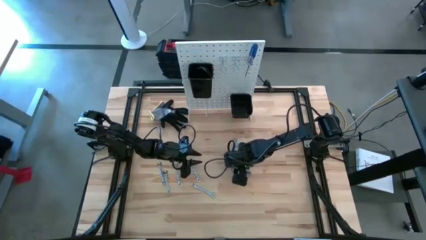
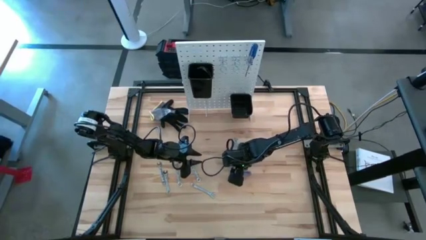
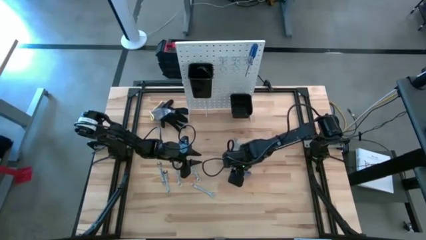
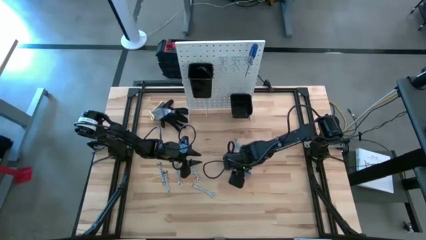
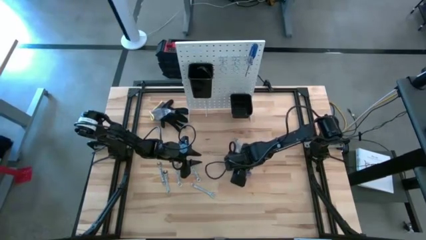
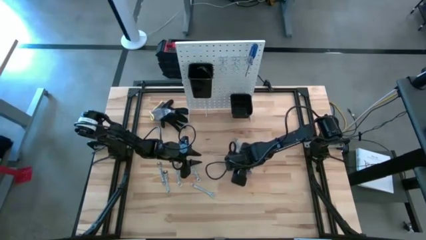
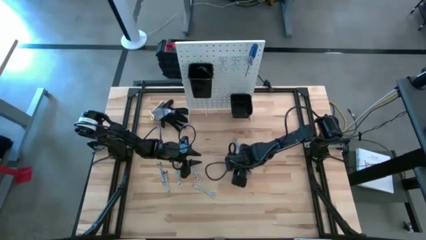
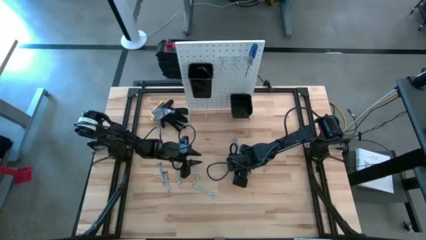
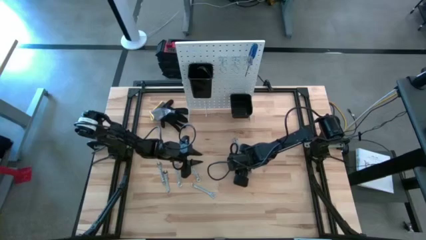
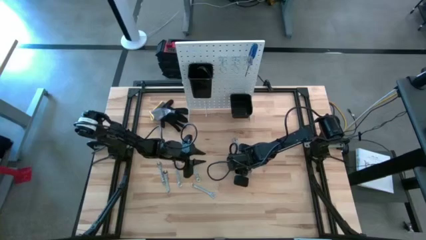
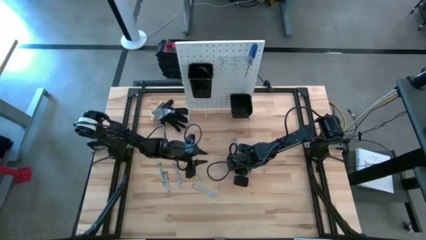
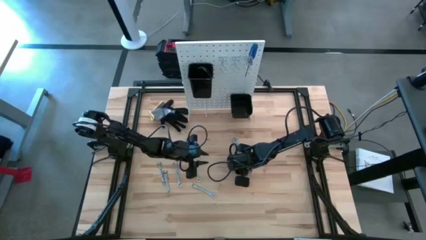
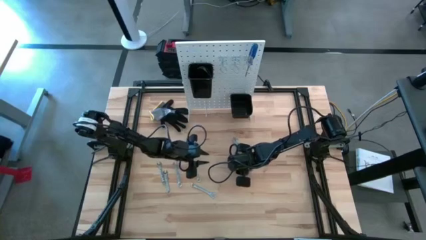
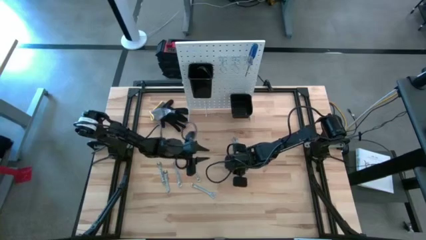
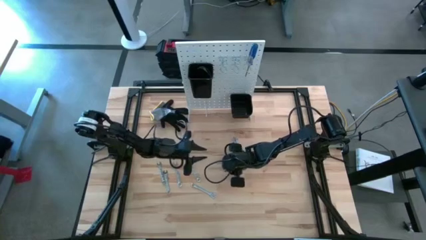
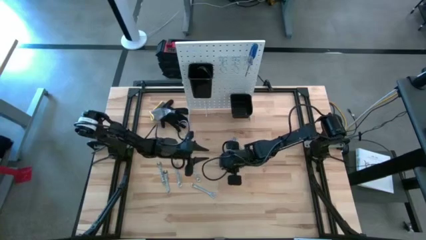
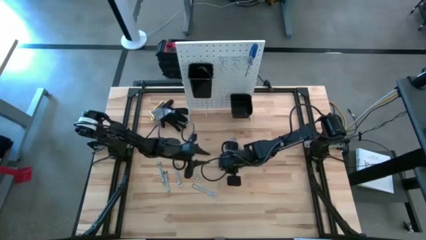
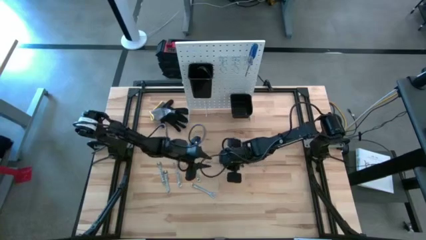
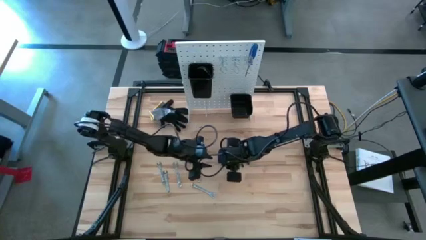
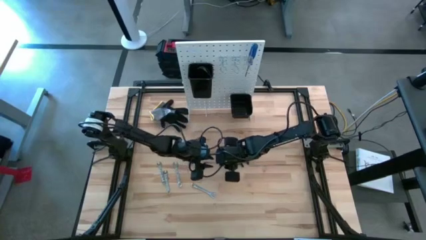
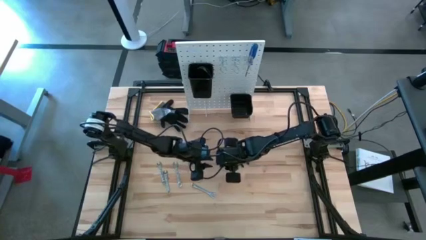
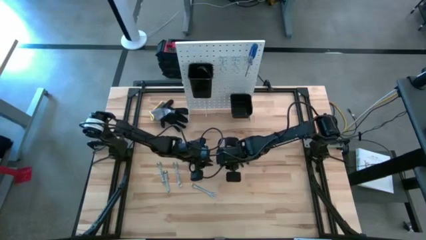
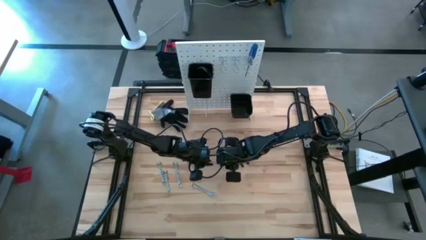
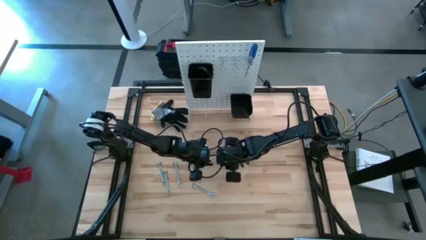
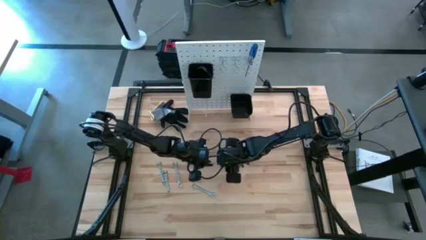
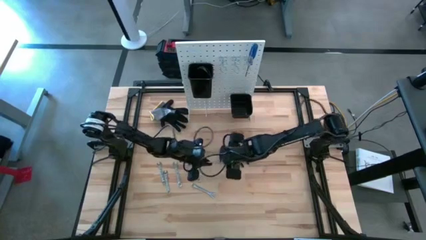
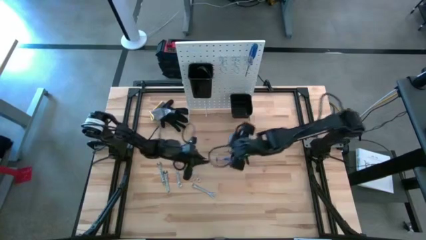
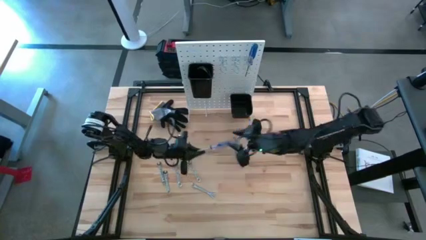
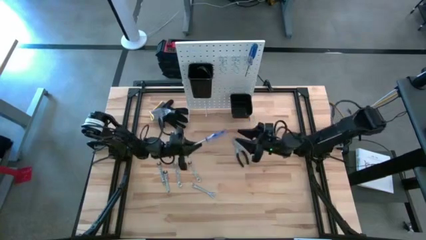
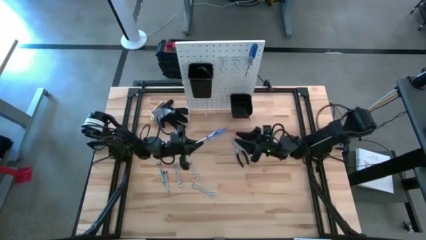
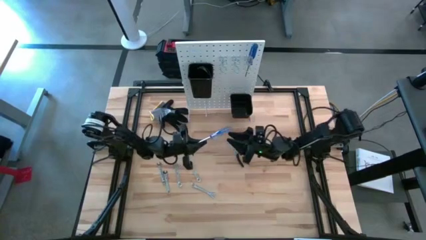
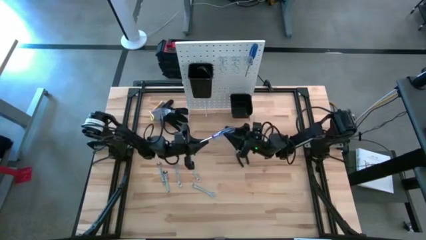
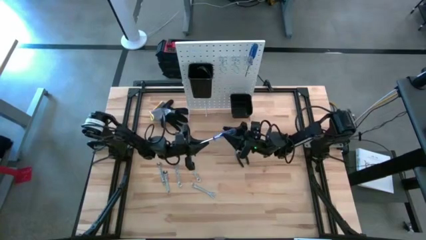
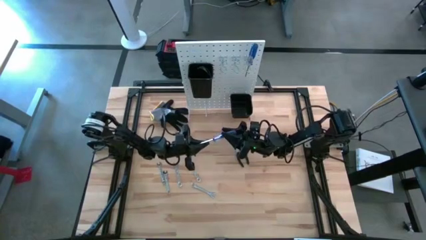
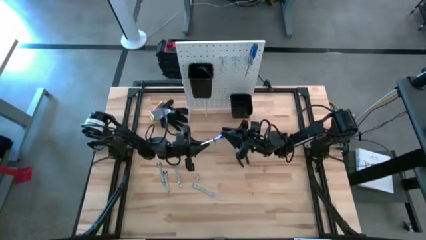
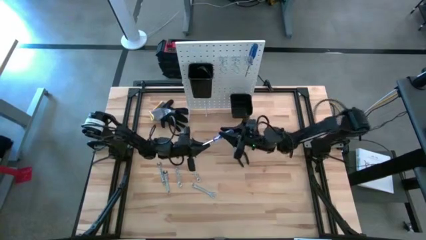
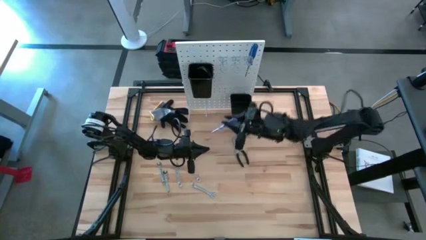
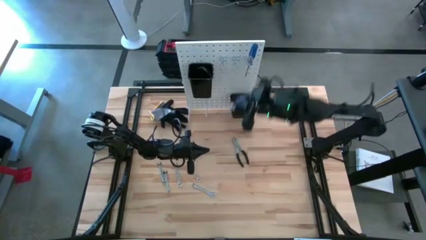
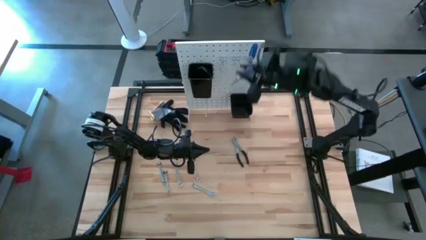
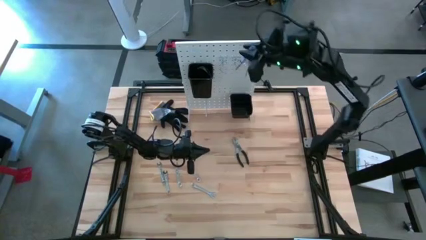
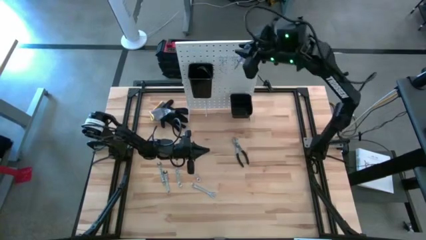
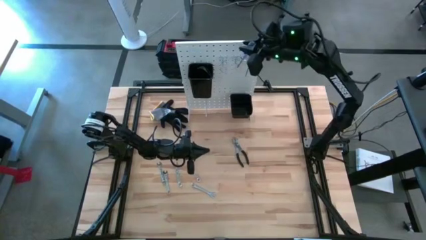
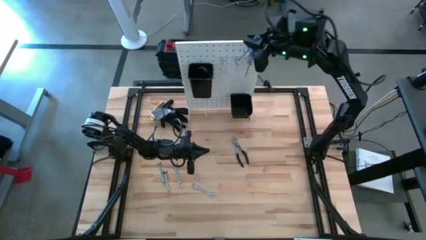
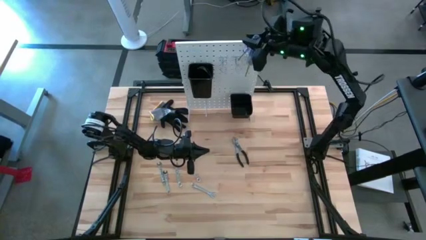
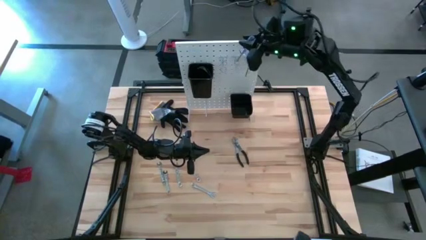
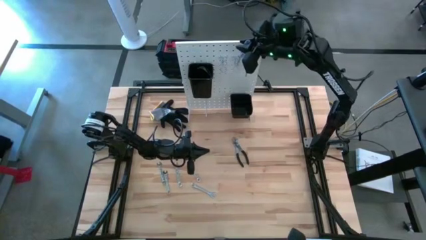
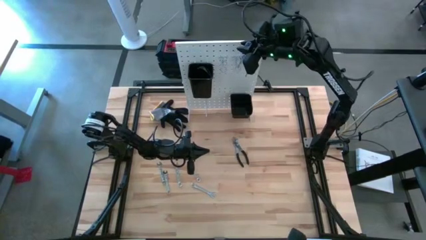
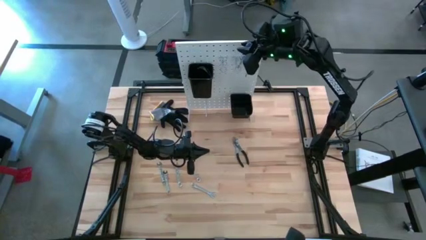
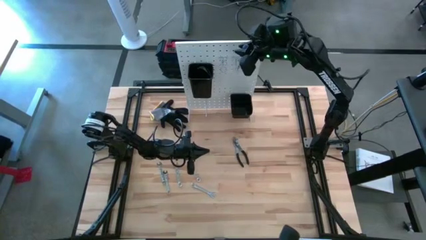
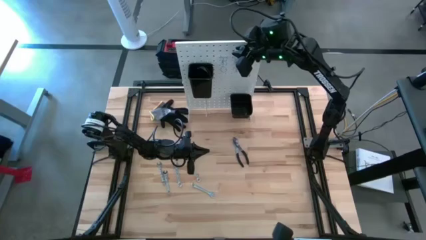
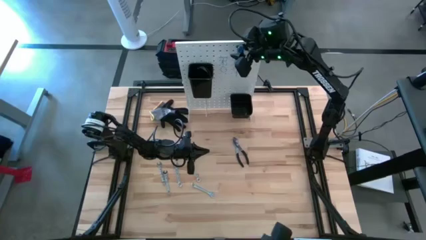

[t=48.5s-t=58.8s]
Task: Hang tools onto peg board
Hang the blue screwdriver on the peg board

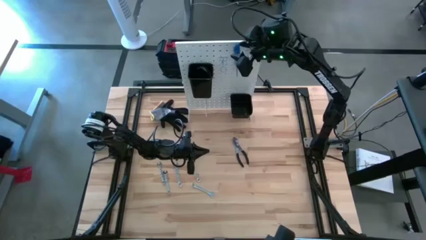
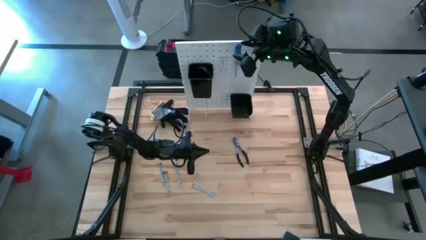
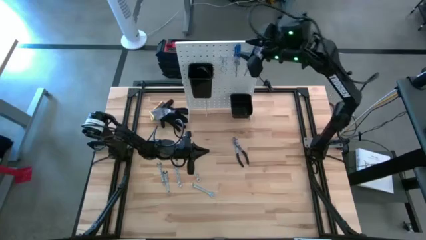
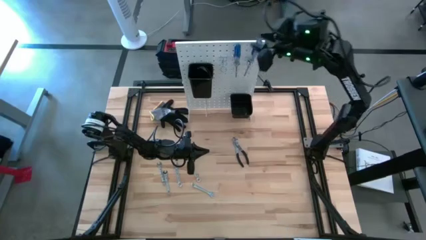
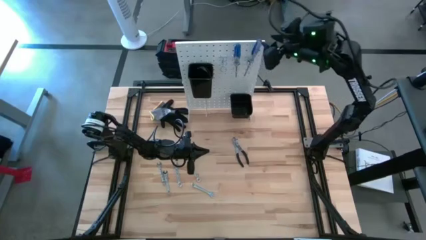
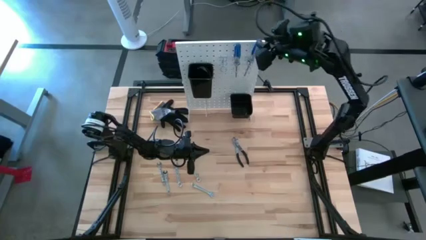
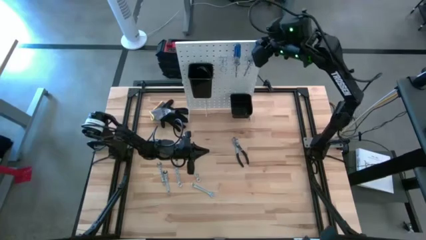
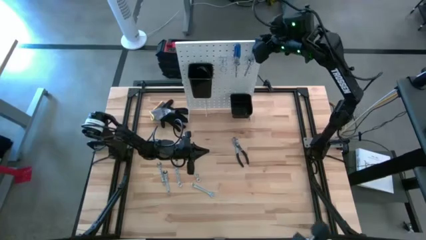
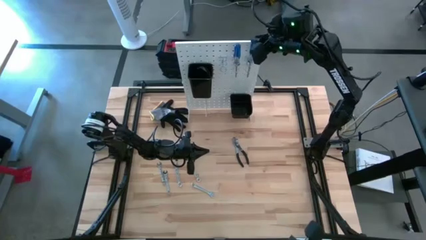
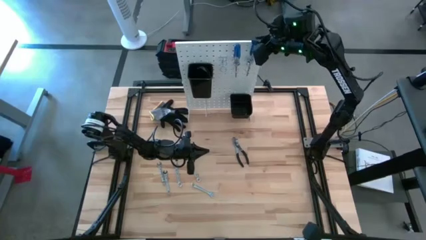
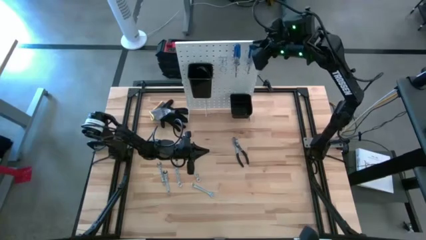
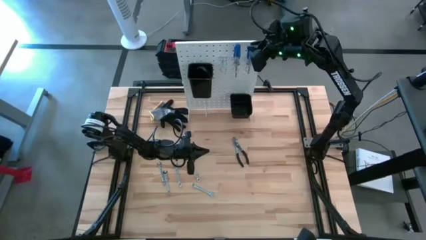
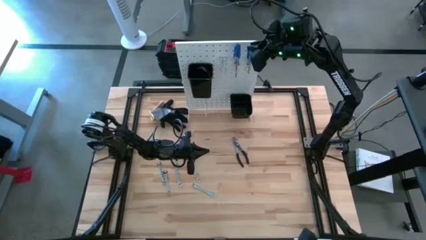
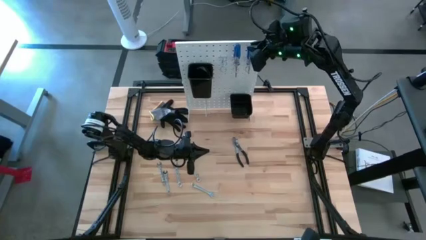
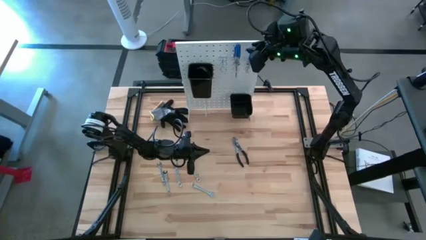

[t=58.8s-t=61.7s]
Adjust the blue screwdriver

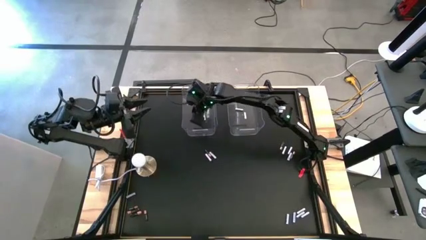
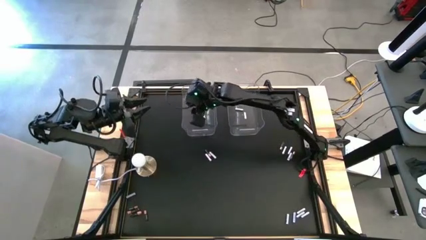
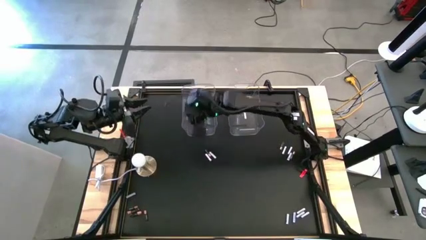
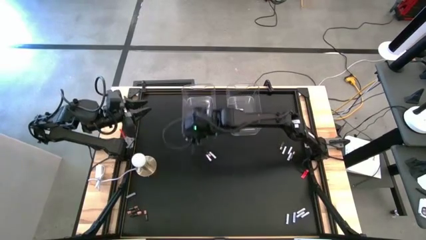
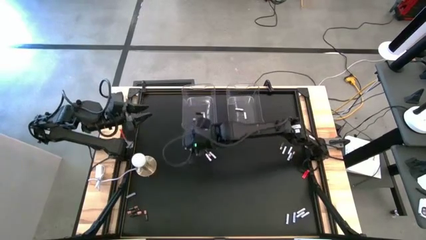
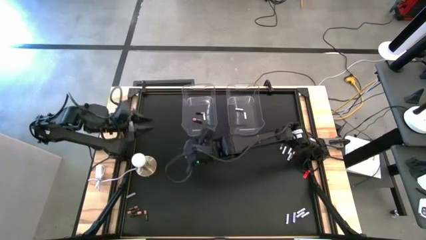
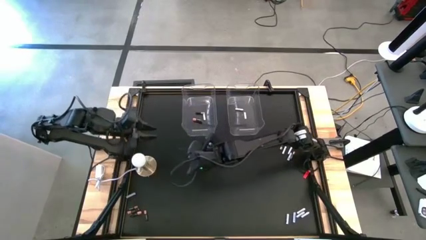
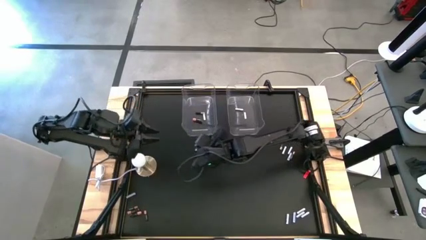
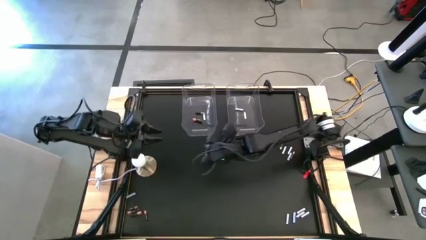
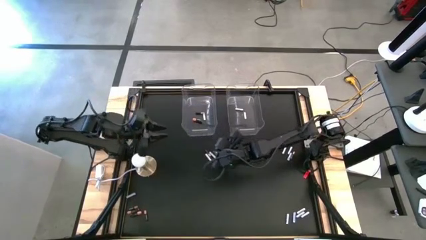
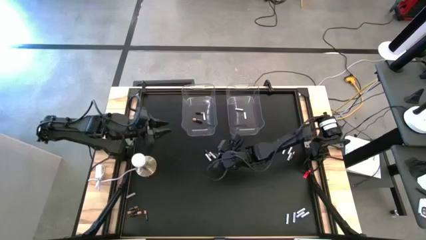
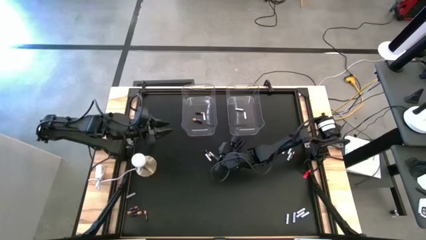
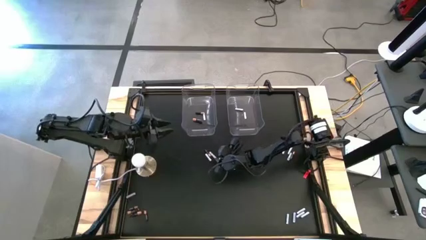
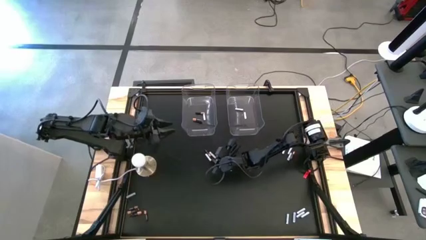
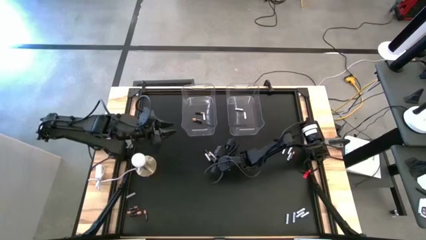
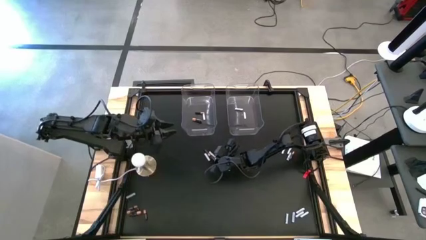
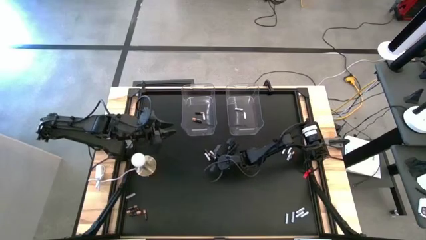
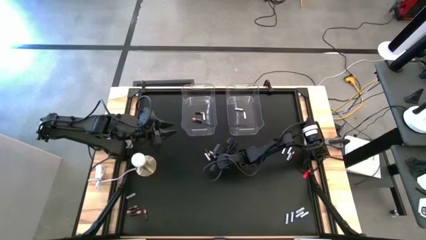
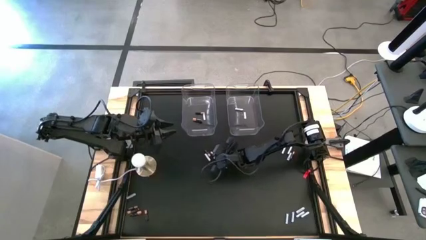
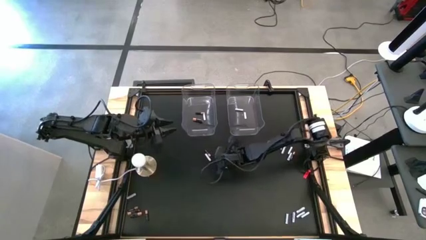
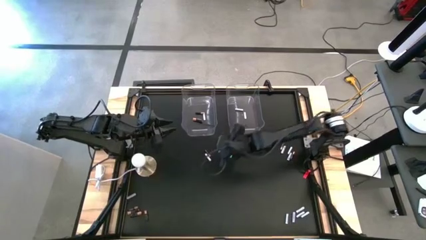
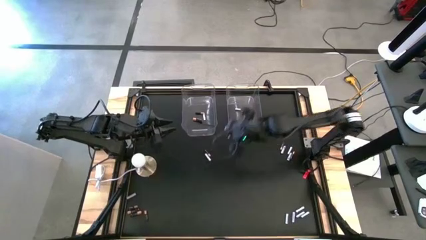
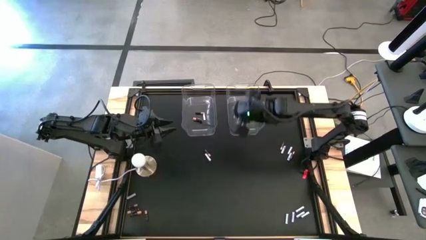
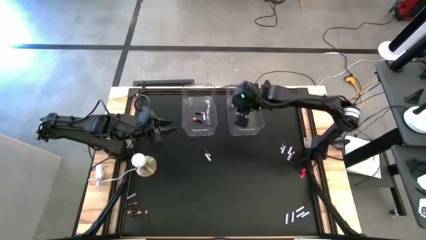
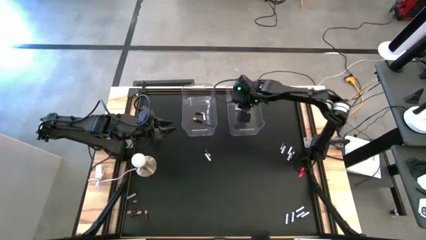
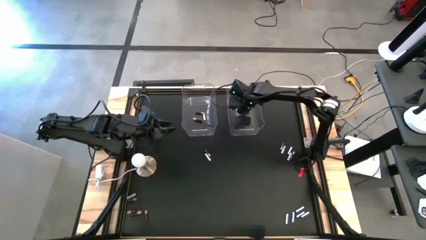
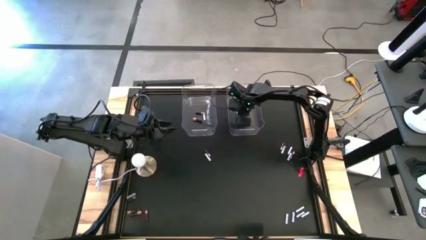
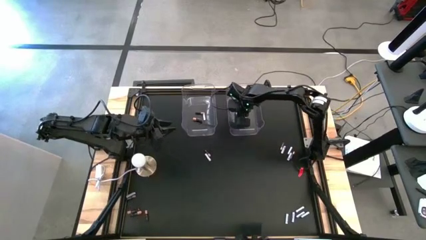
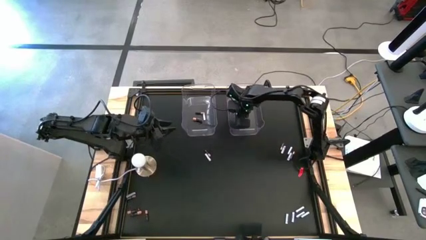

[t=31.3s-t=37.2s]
Task: Sort batteries
Put the white battery into the right transparent bin
